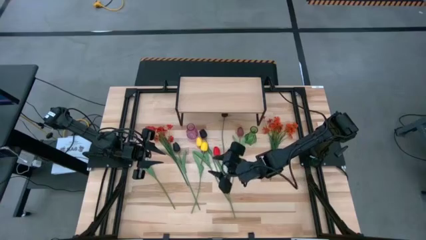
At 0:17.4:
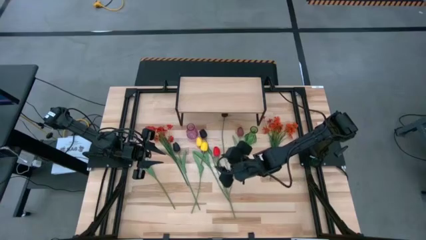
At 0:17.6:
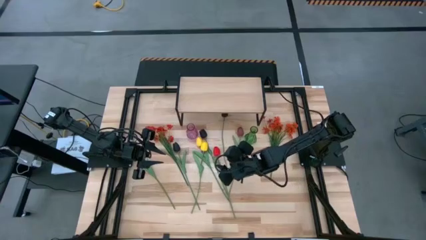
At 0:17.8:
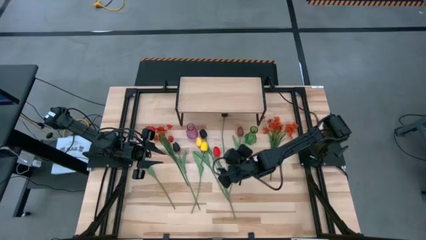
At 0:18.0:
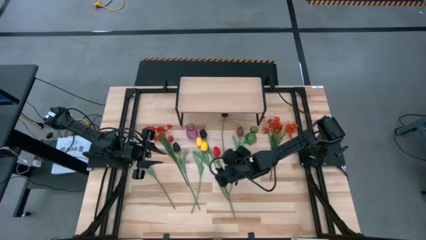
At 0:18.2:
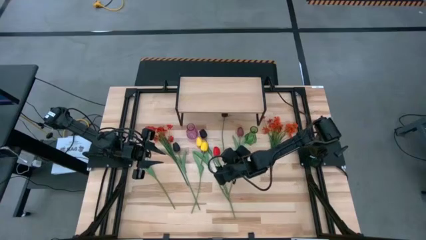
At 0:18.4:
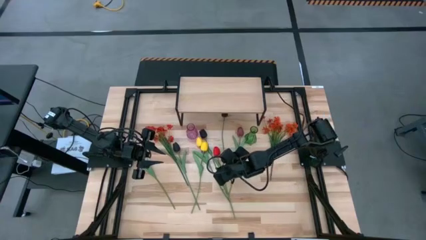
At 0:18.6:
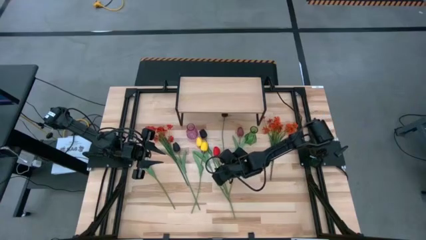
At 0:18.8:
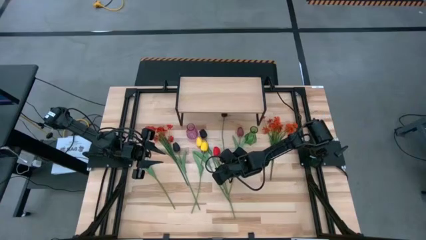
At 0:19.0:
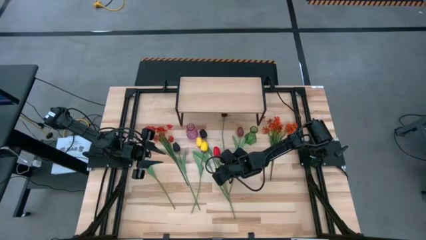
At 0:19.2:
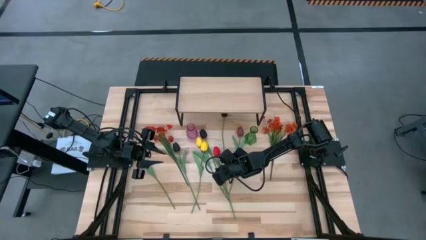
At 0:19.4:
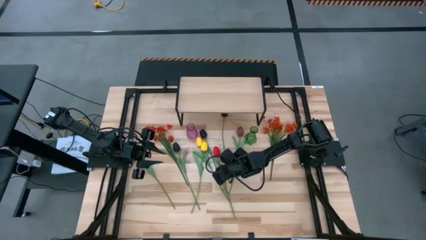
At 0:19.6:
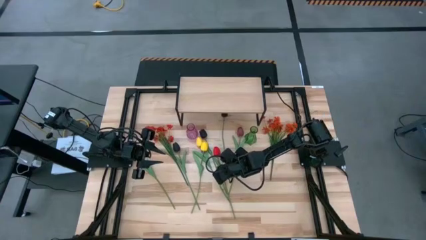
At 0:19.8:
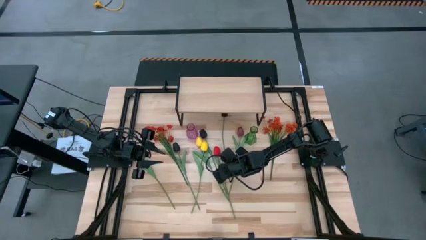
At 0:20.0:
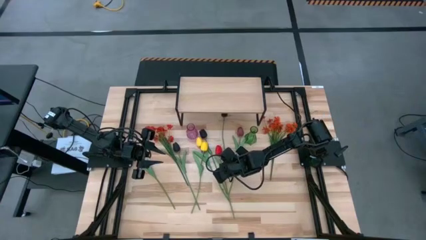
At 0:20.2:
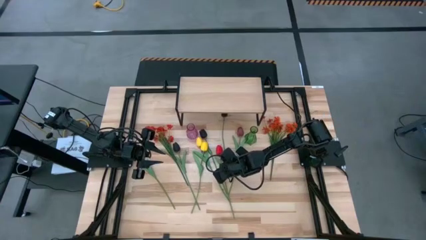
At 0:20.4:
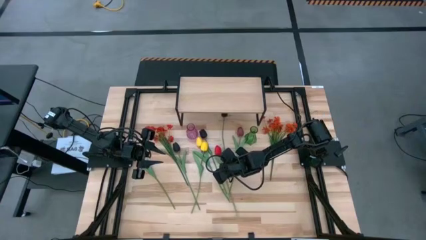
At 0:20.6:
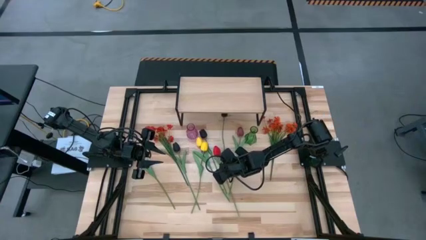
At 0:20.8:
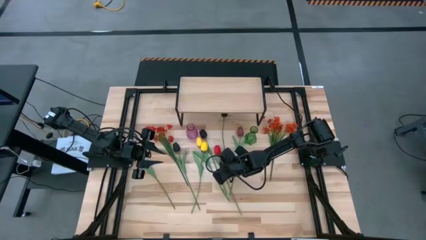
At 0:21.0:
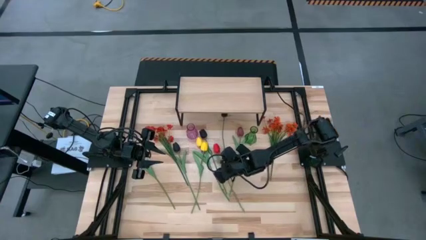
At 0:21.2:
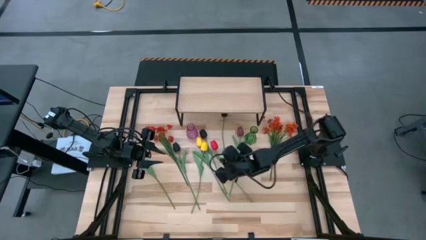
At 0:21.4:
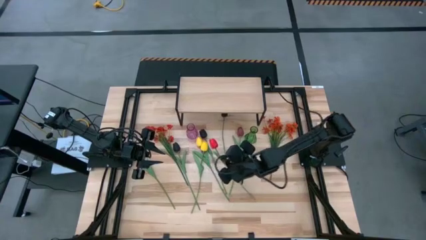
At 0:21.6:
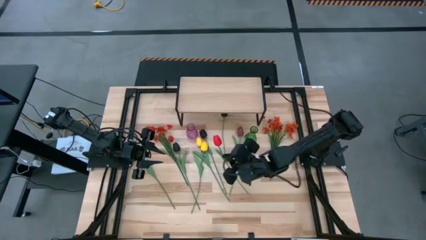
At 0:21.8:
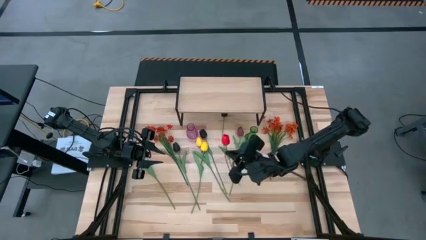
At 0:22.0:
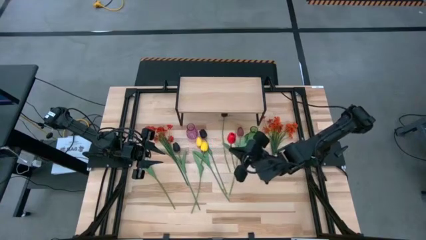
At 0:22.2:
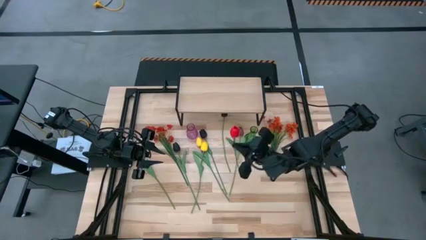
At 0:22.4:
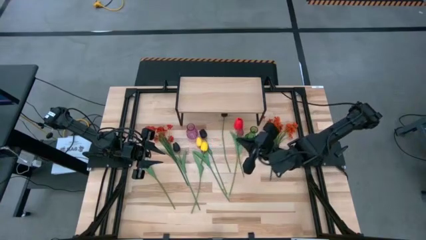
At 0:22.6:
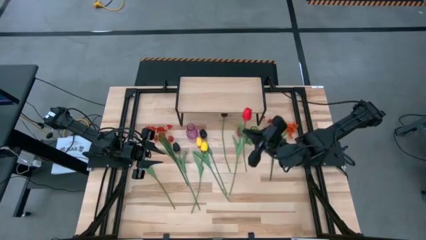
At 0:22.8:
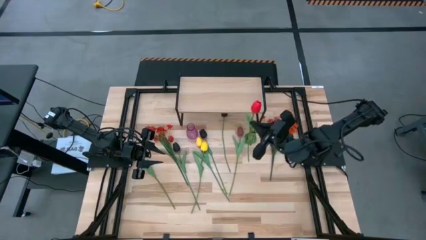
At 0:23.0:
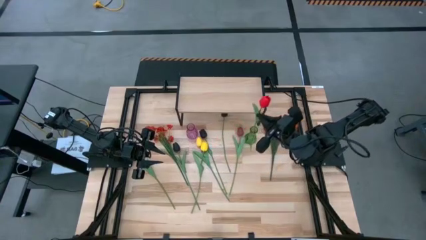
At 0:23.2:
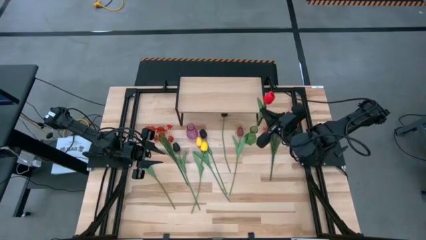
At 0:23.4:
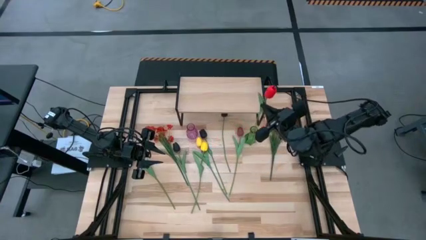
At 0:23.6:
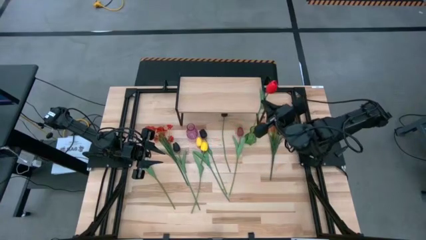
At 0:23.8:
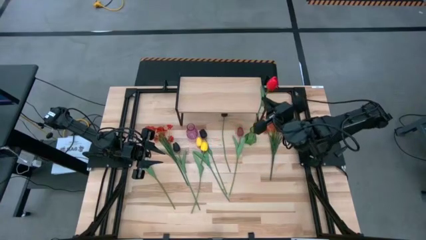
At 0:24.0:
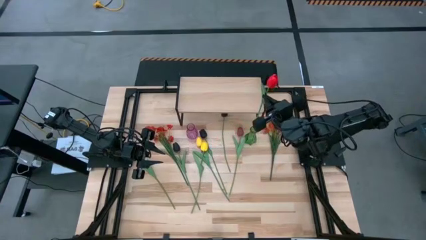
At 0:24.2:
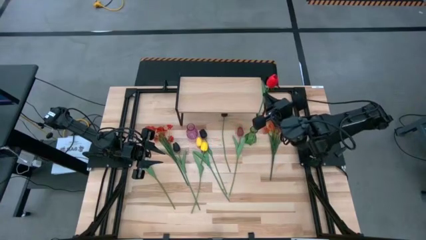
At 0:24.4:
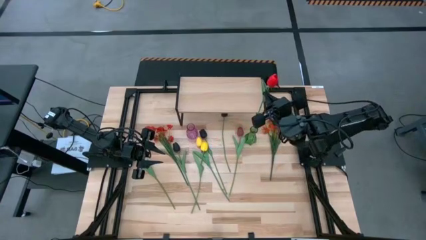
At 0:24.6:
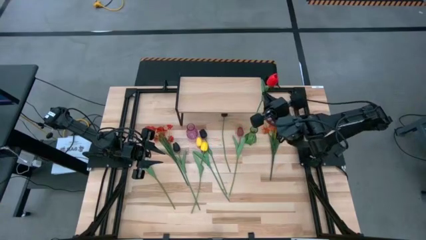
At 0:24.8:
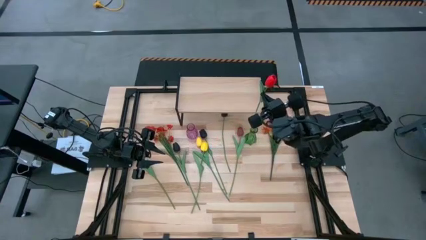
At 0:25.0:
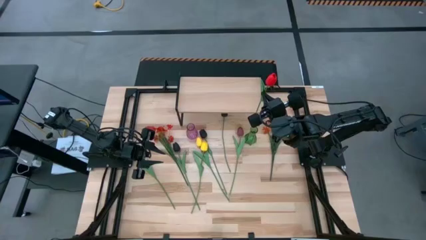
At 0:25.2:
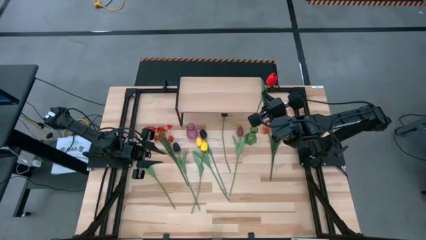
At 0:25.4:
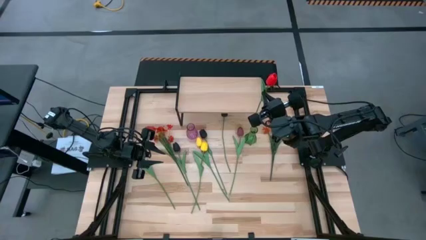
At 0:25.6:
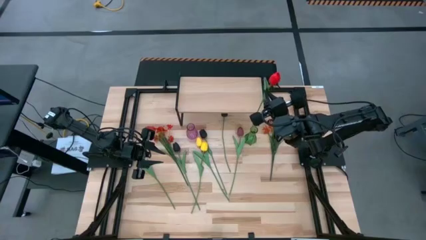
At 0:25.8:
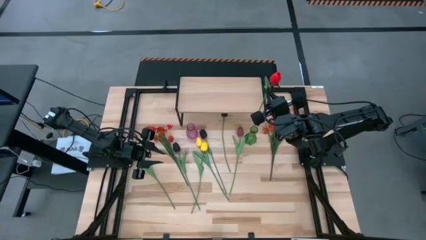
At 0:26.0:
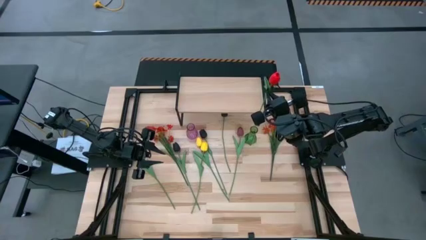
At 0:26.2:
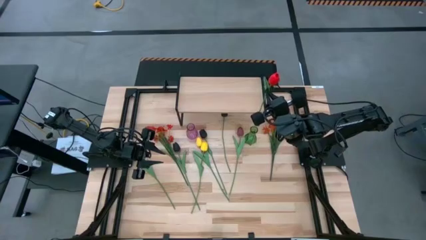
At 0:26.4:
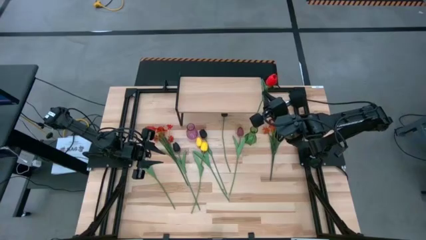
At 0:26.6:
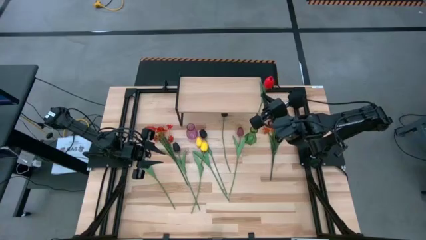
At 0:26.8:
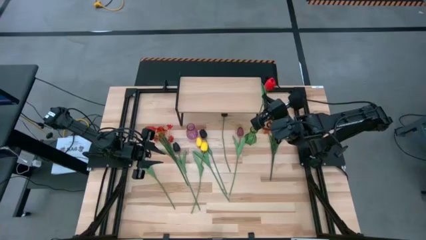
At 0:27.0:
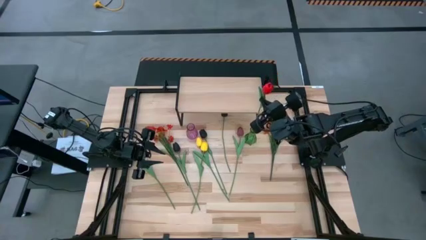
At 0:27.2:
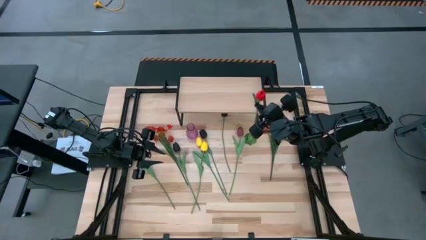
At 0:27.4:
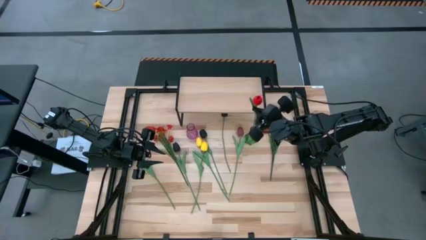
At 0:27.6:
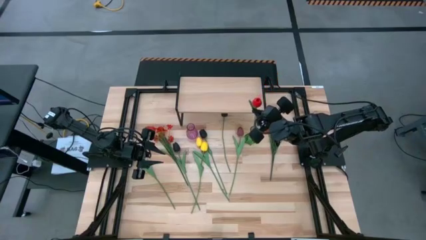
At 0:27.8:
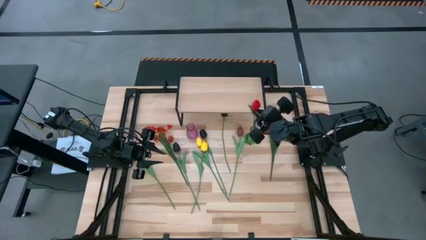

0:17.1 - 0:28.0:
Task: Pick and place flowers into a vace then onto a shelf
Put the red tulip into the green vase
